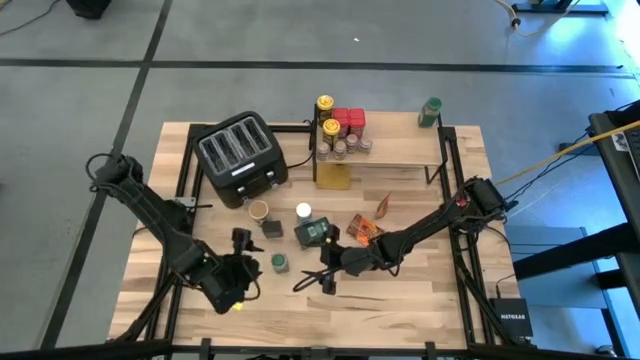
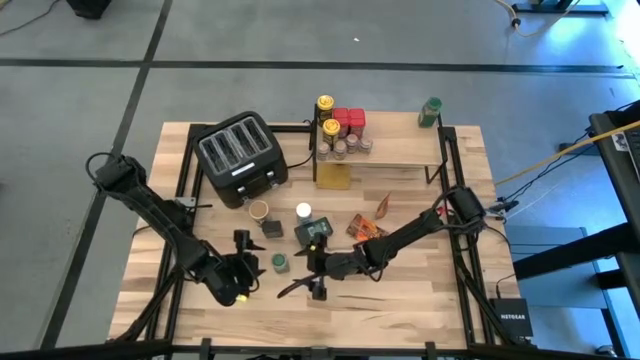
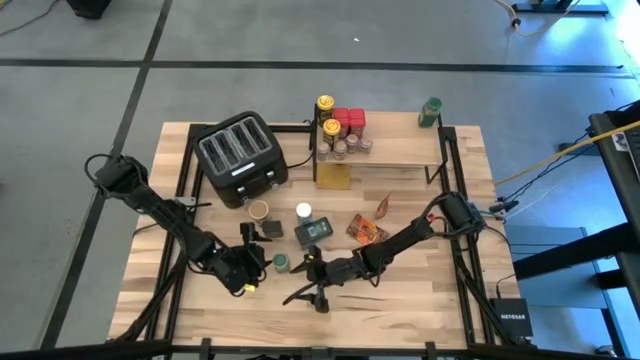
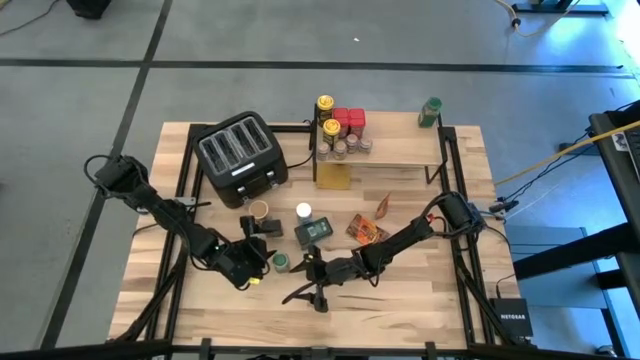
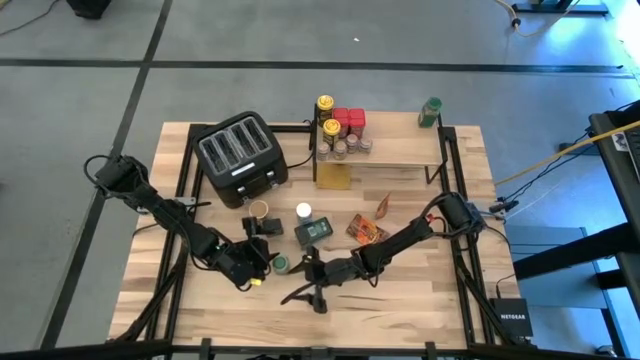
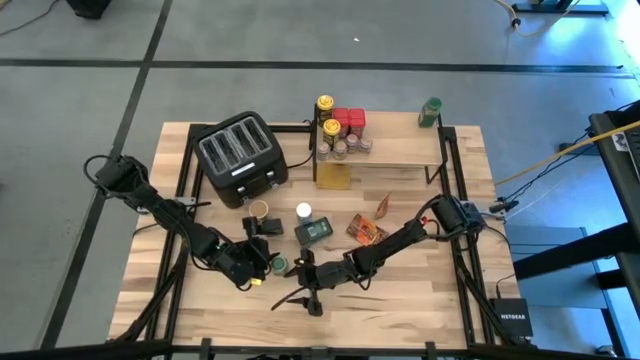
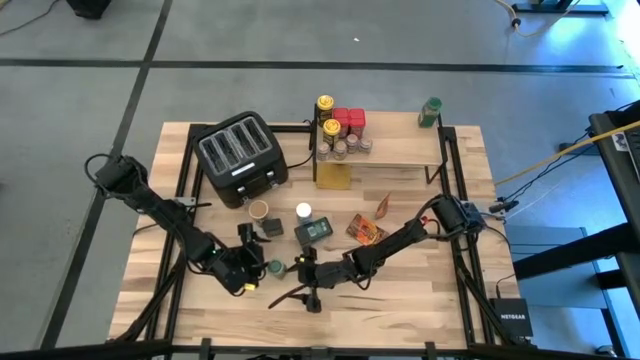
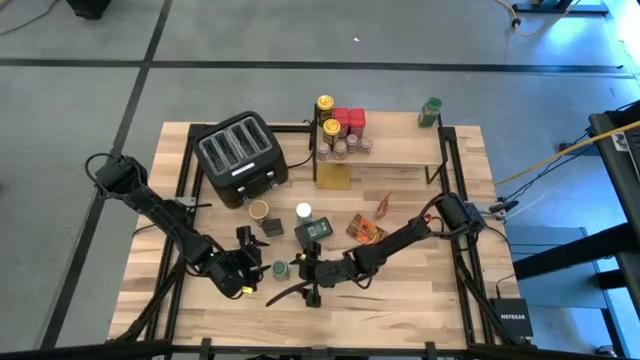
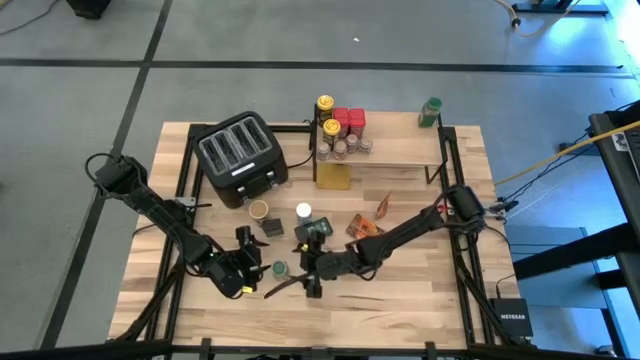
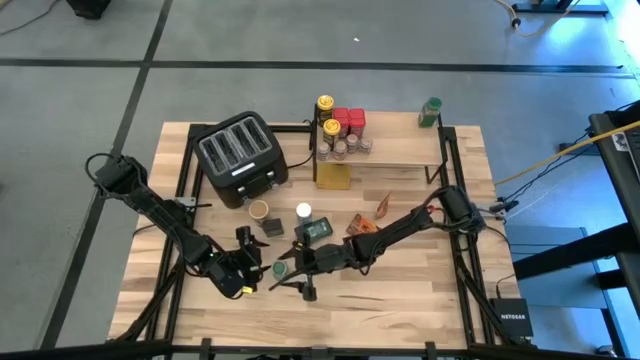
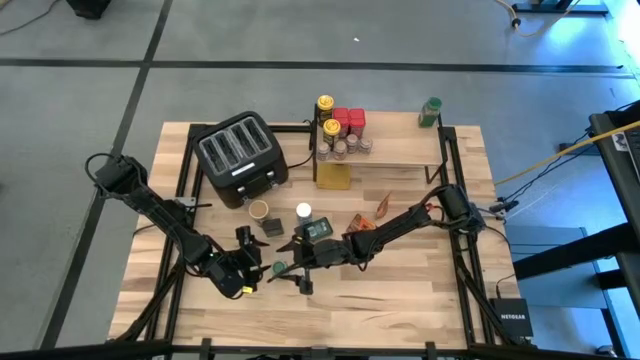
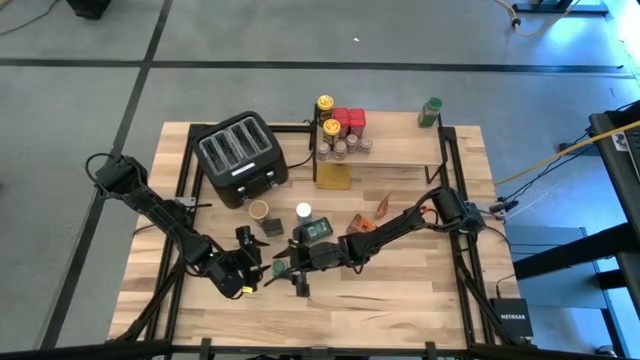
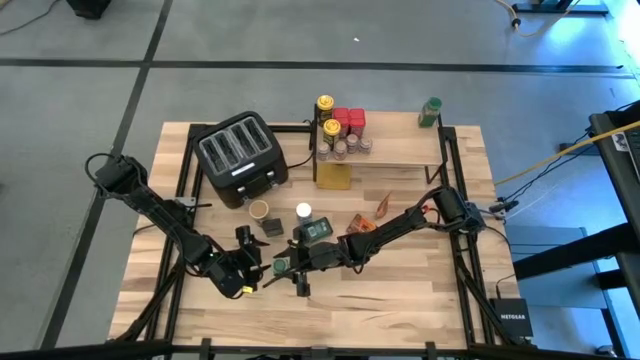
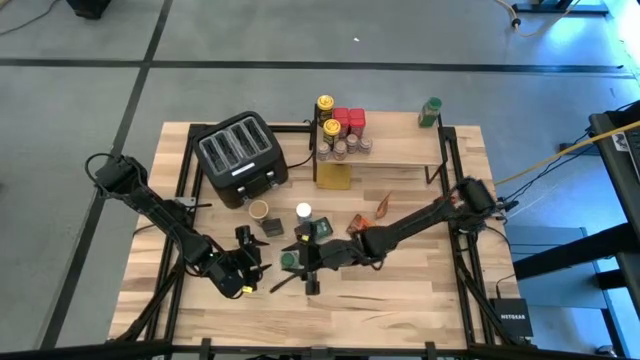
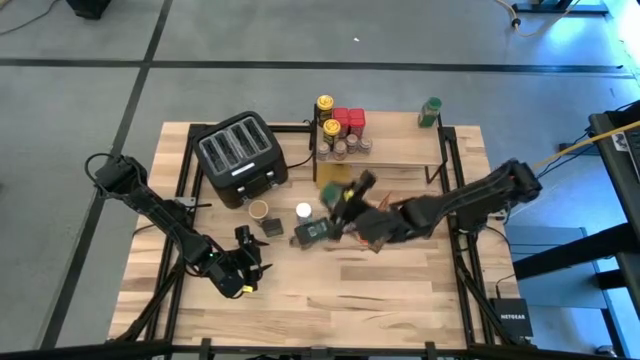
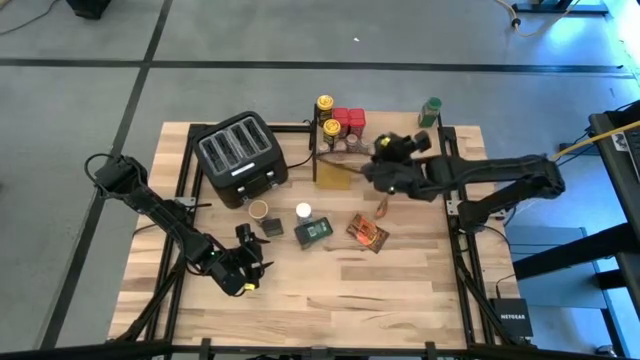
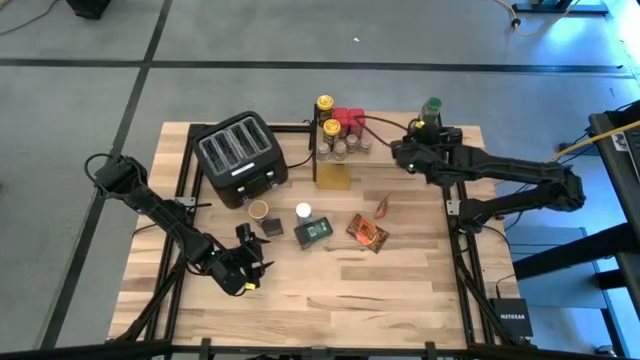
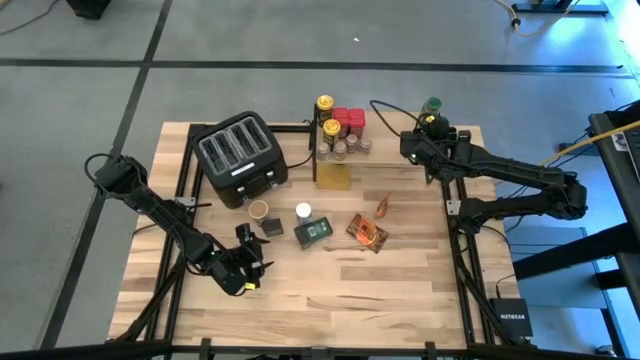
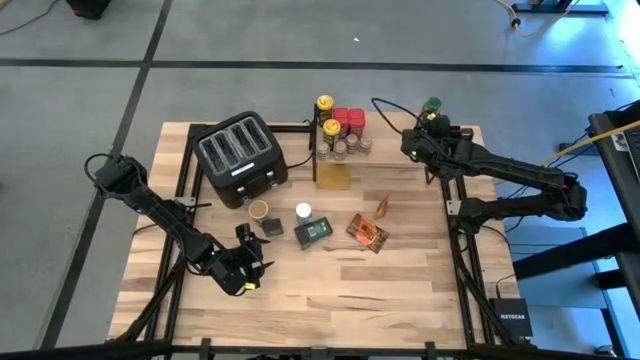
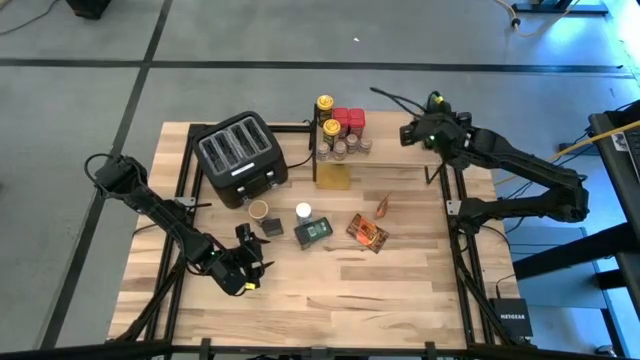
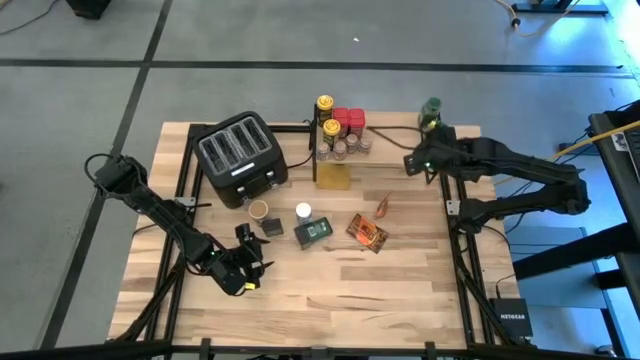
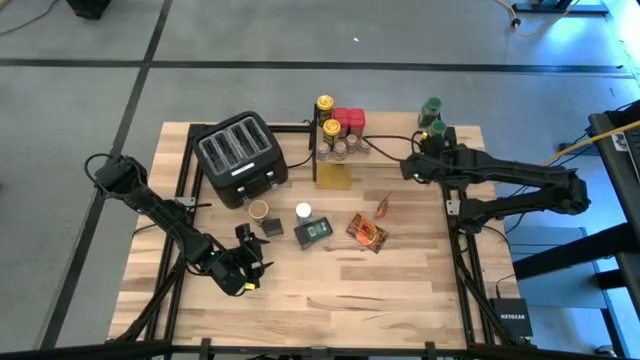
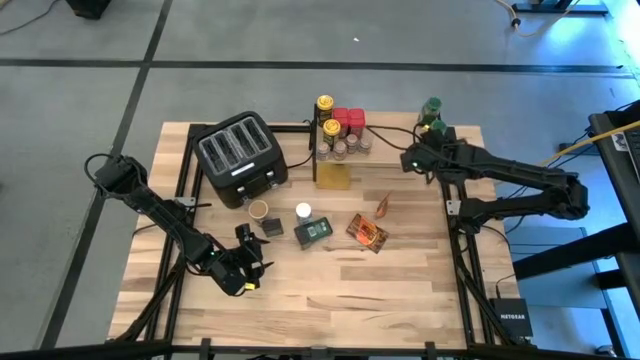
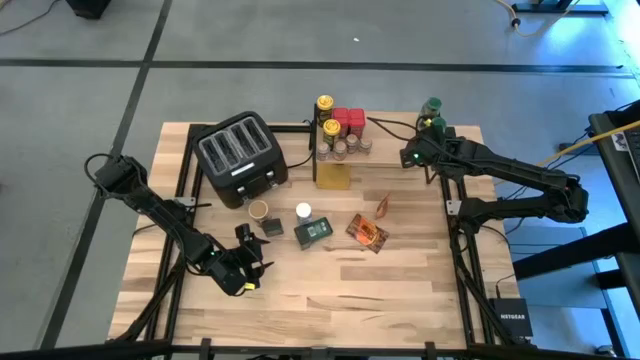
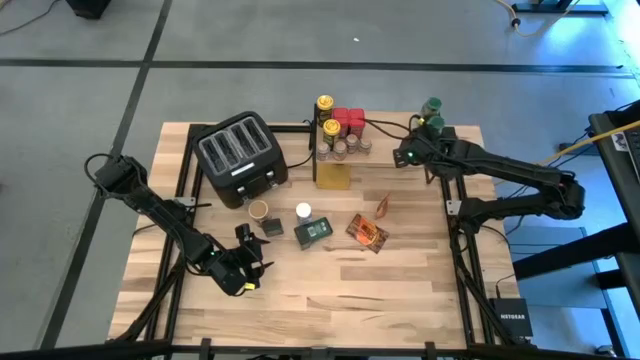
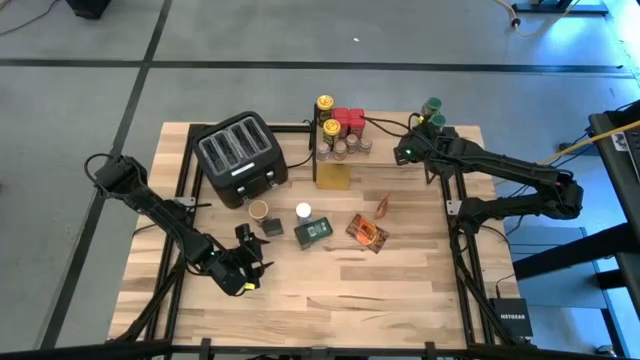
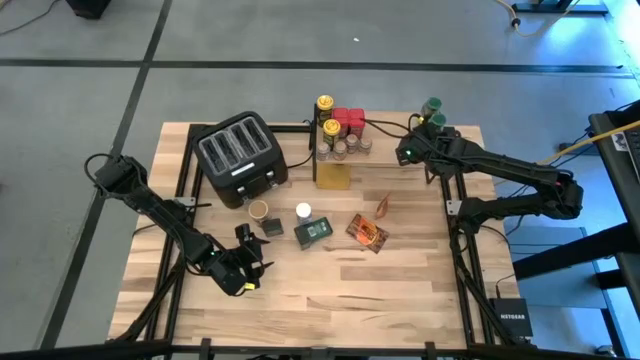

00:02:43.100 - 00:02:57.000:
Task: Shelf spices
Put the green seasoning bottle on the shelf

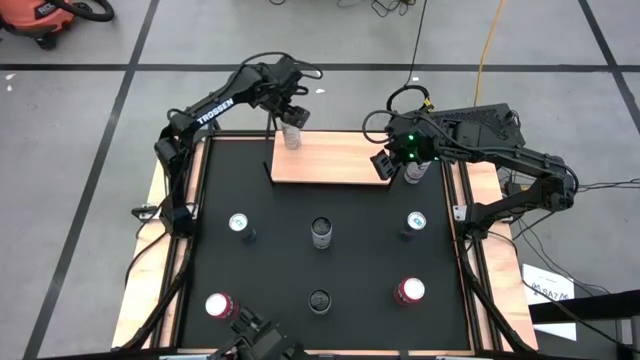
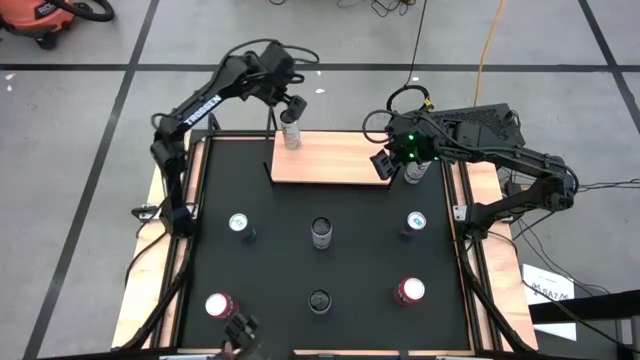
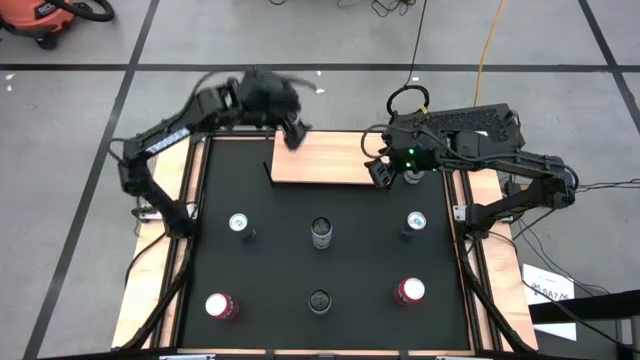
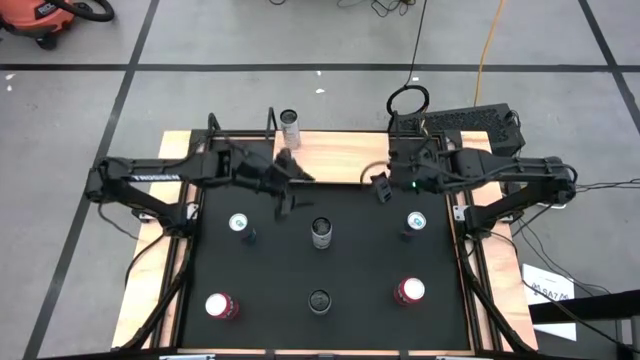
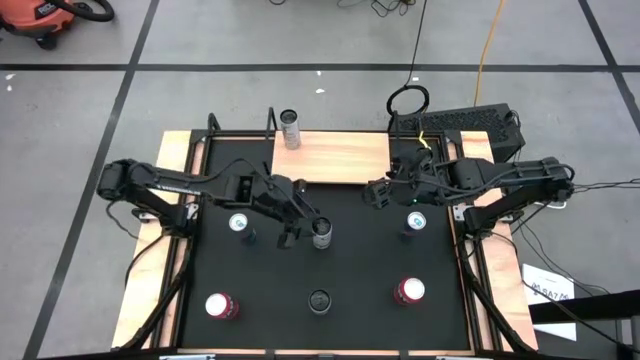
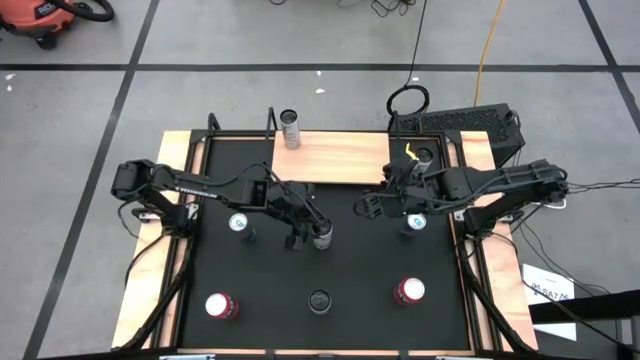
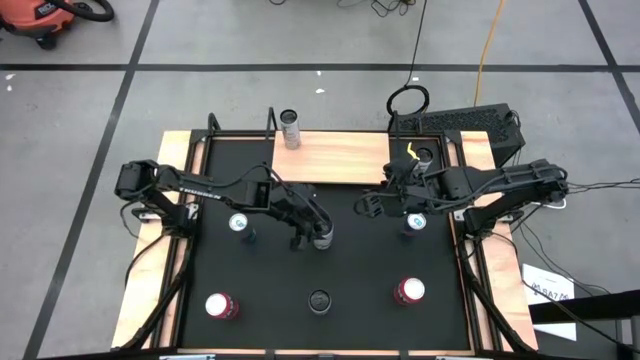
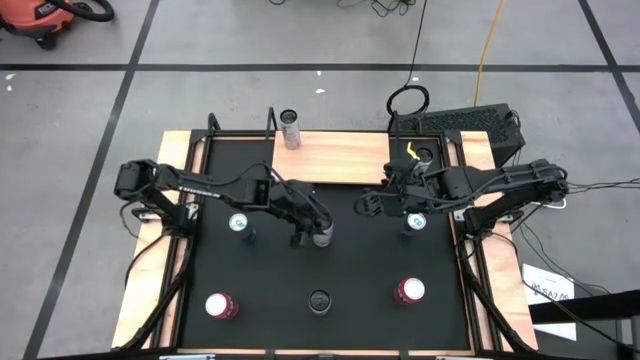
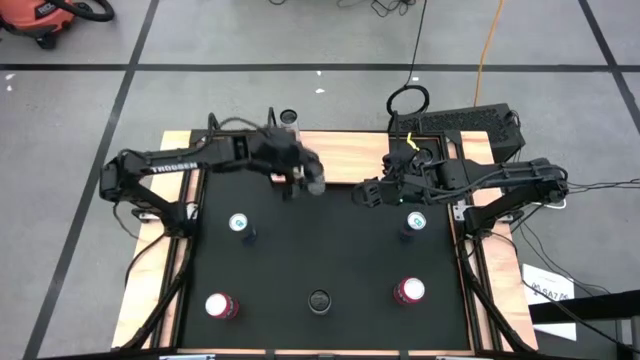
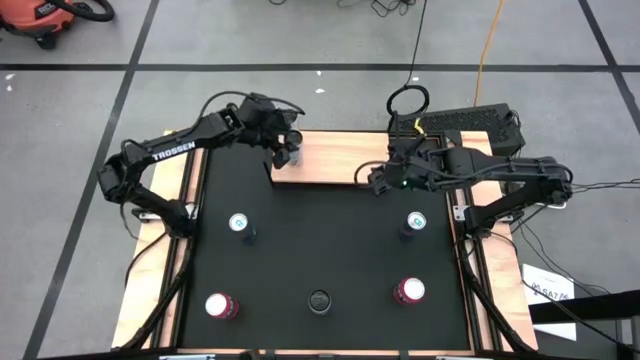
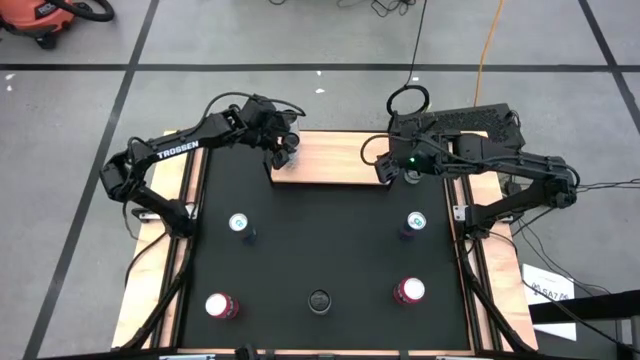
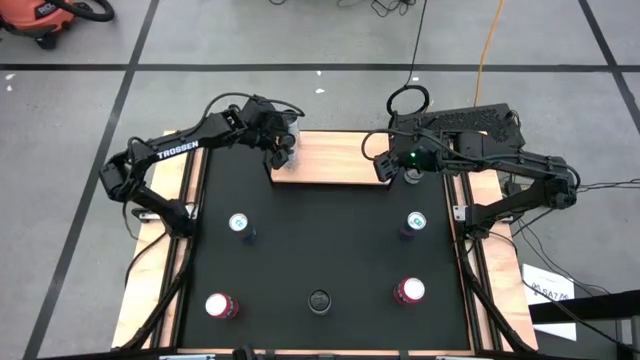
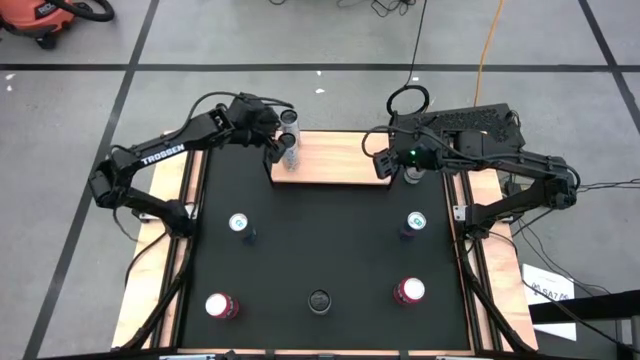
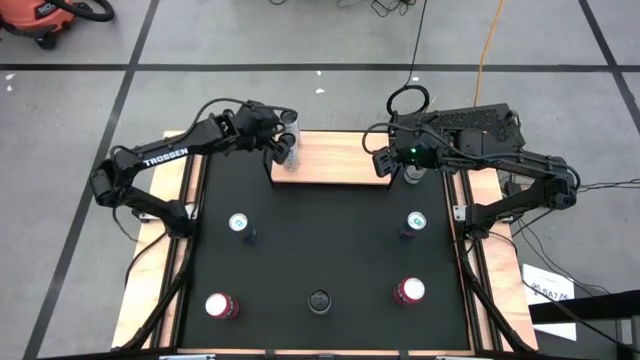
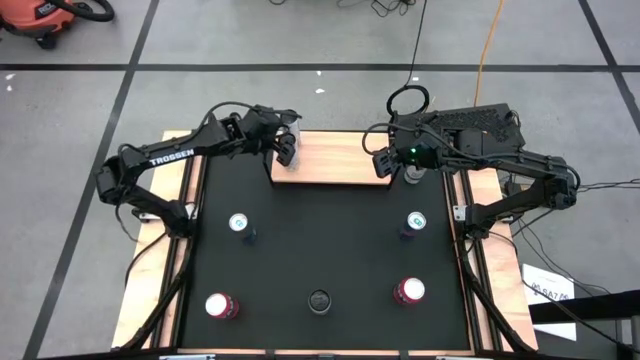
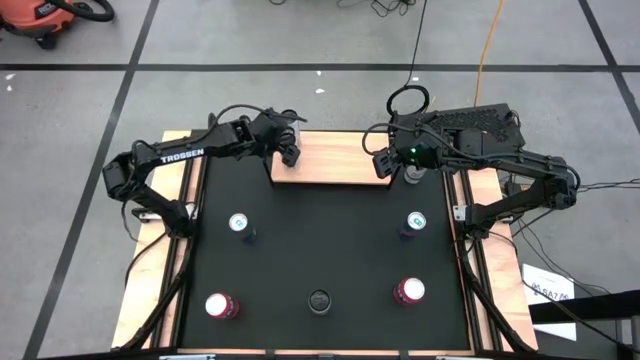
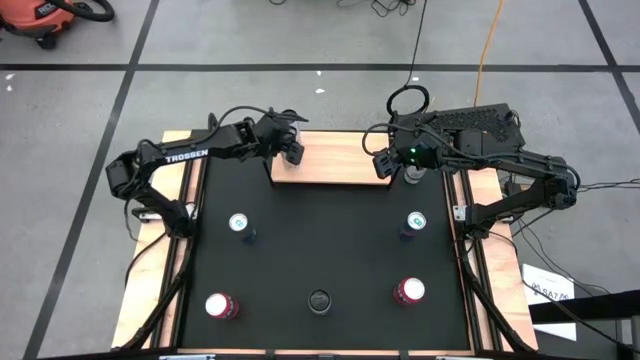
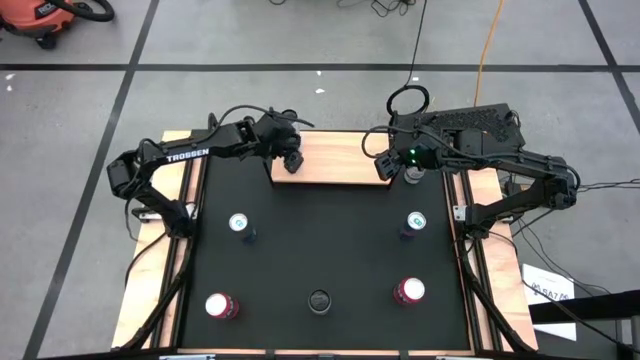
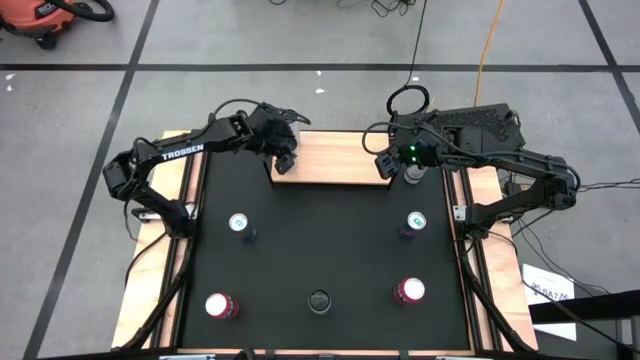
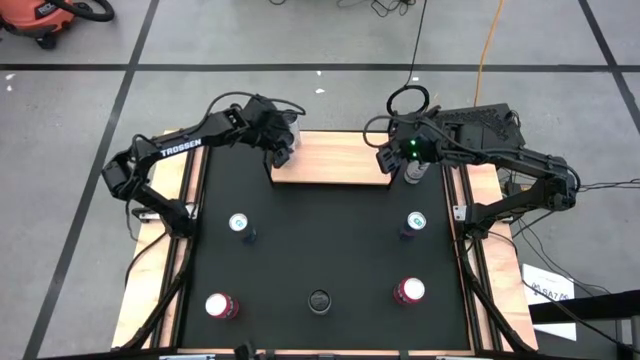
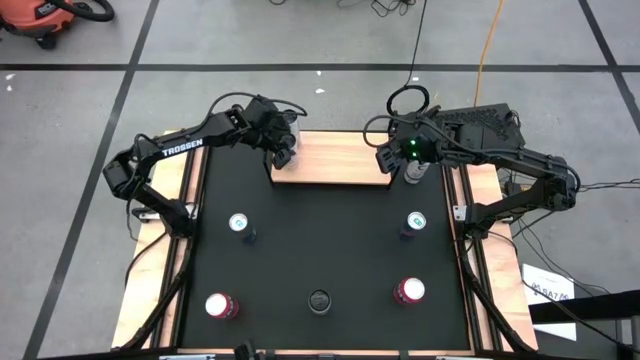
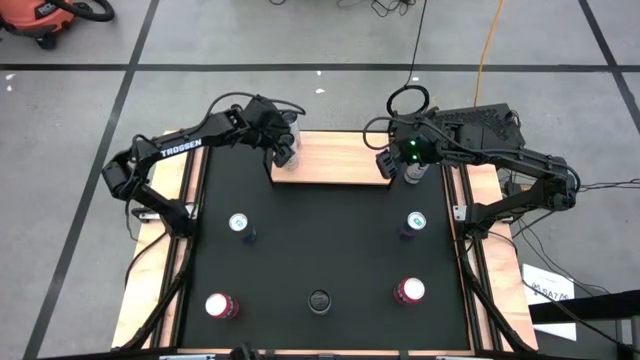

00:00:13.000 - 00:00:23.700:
Task: Place canned beverage on shelf
Put the white-yellow soda can on the shelf aligned with the other white-yellow soda can
